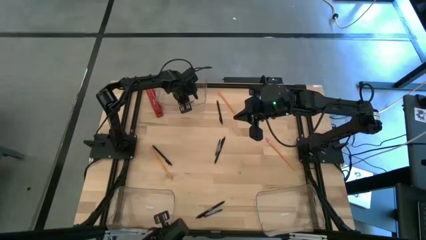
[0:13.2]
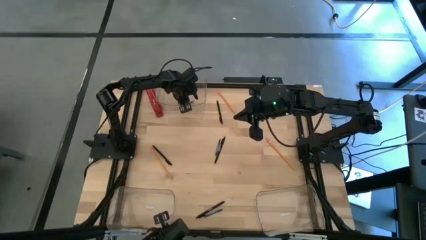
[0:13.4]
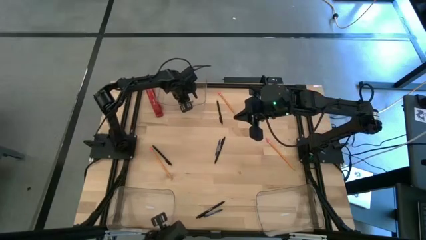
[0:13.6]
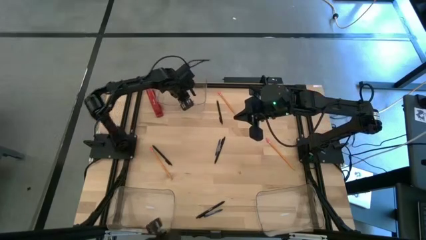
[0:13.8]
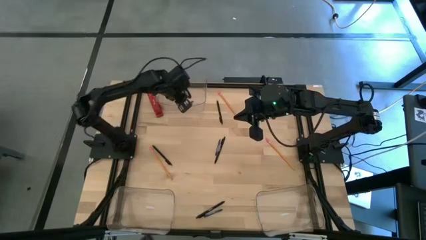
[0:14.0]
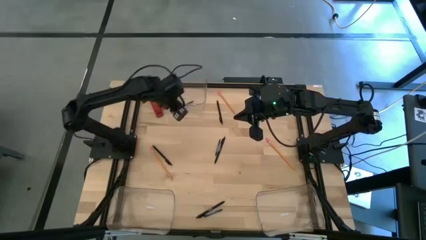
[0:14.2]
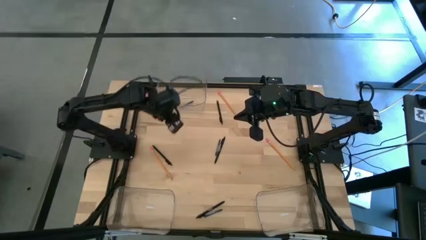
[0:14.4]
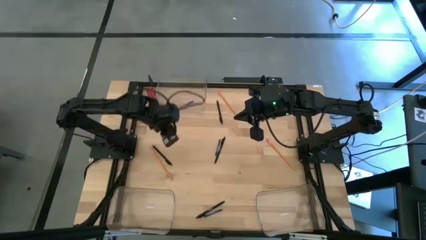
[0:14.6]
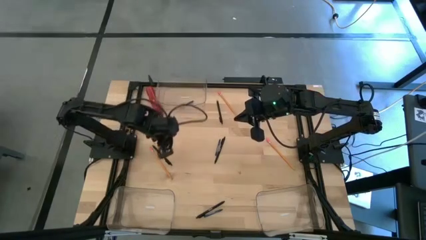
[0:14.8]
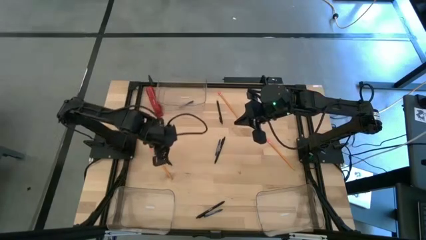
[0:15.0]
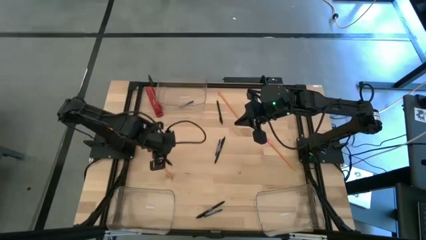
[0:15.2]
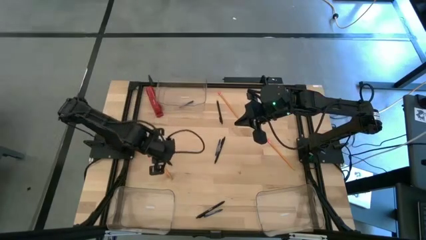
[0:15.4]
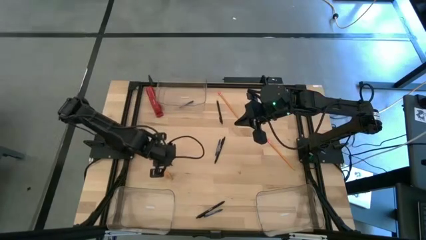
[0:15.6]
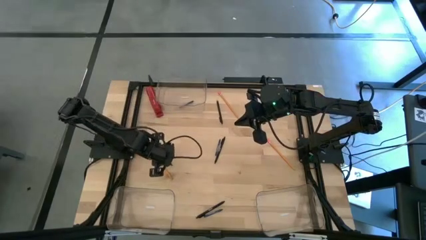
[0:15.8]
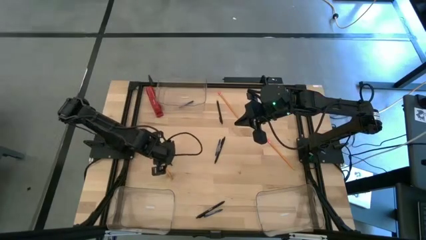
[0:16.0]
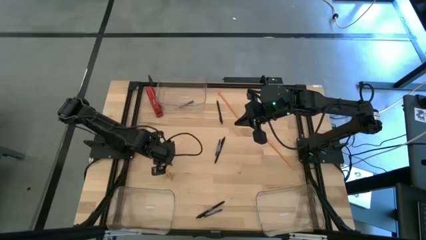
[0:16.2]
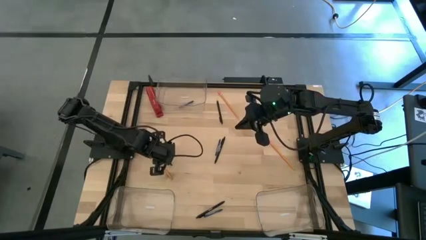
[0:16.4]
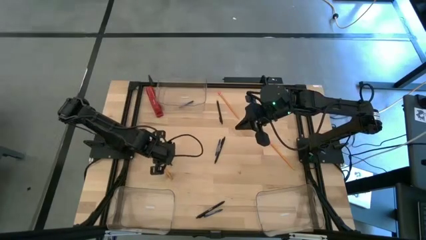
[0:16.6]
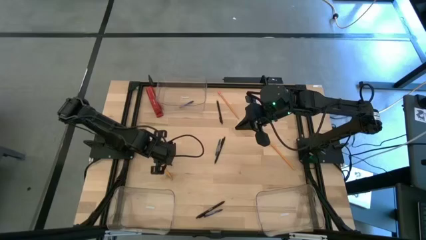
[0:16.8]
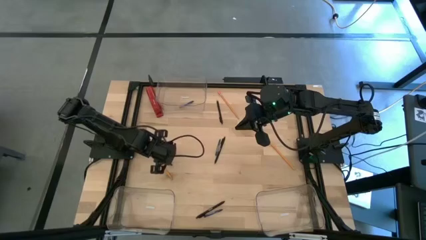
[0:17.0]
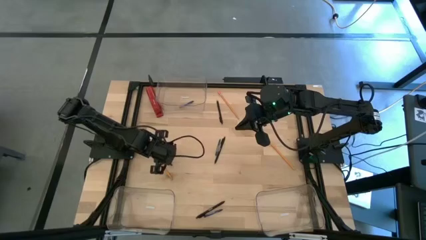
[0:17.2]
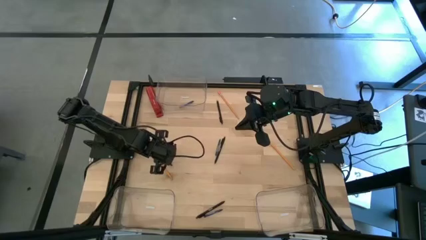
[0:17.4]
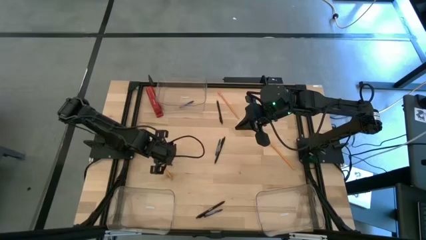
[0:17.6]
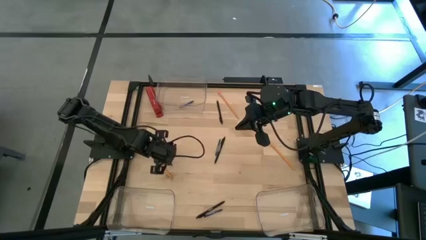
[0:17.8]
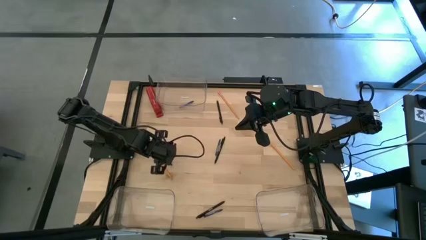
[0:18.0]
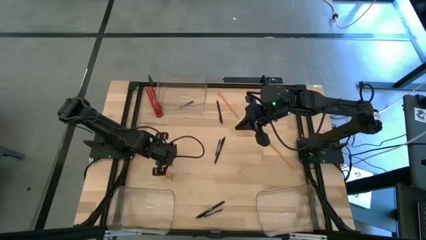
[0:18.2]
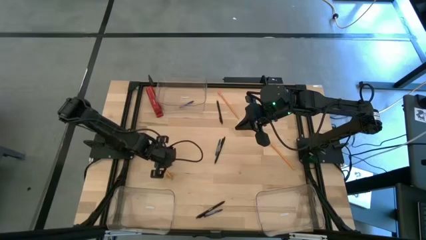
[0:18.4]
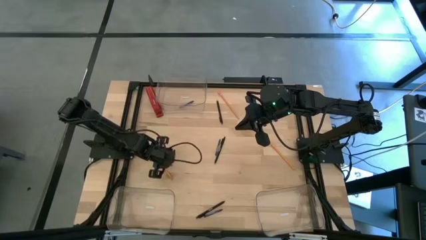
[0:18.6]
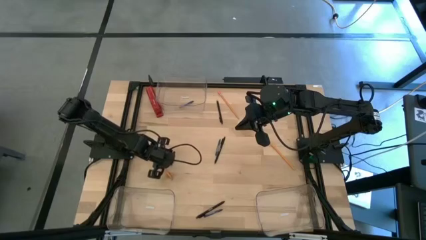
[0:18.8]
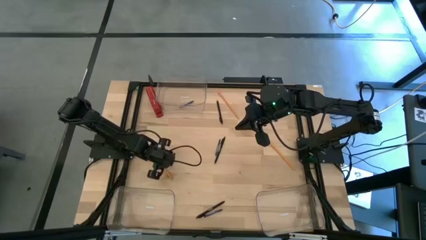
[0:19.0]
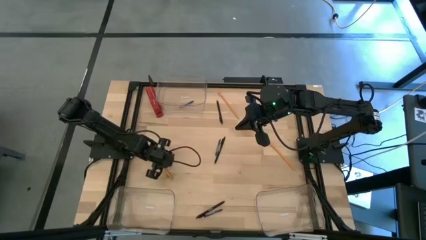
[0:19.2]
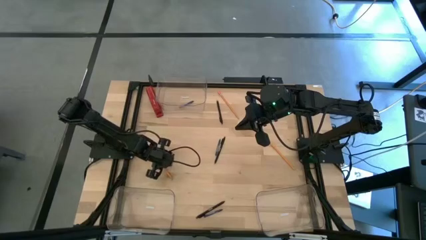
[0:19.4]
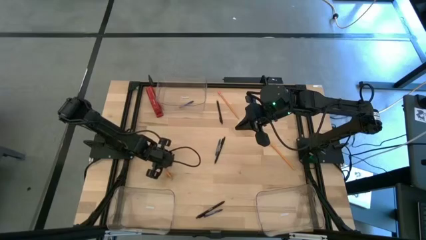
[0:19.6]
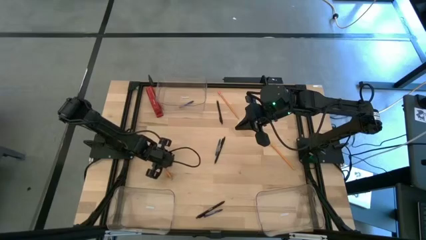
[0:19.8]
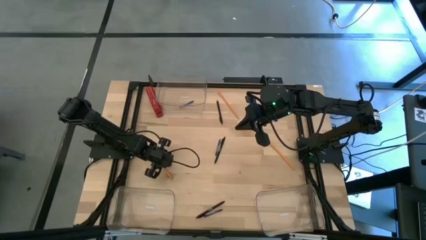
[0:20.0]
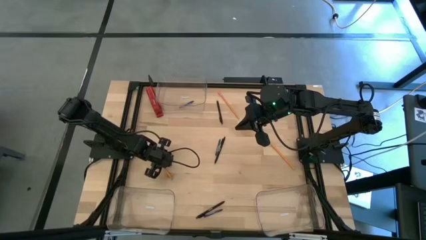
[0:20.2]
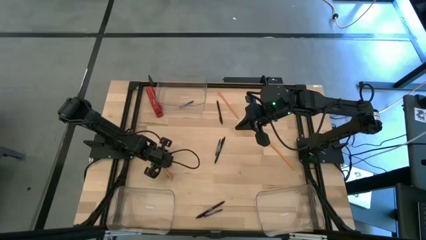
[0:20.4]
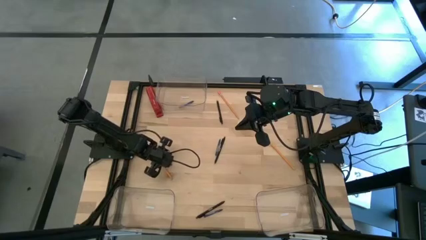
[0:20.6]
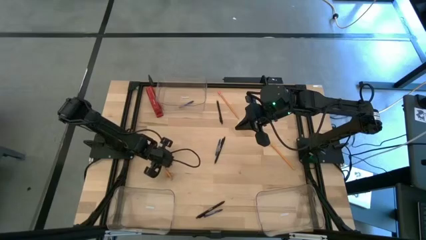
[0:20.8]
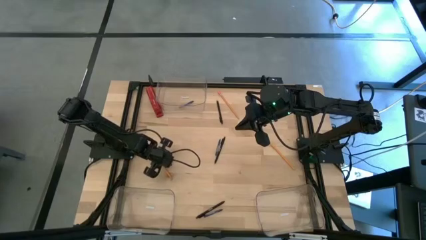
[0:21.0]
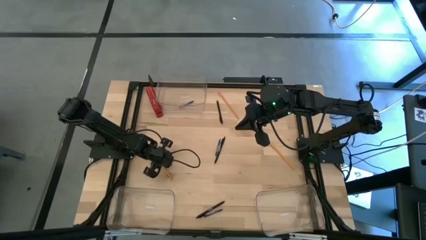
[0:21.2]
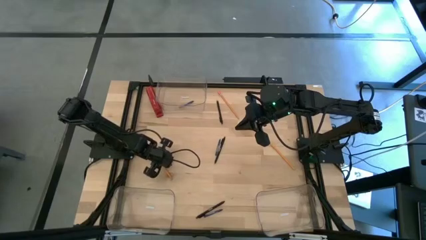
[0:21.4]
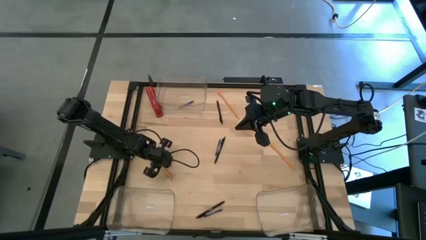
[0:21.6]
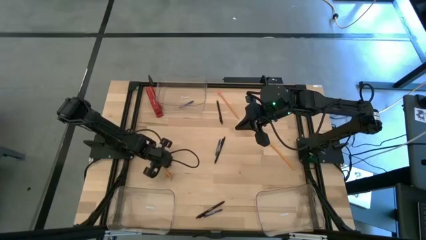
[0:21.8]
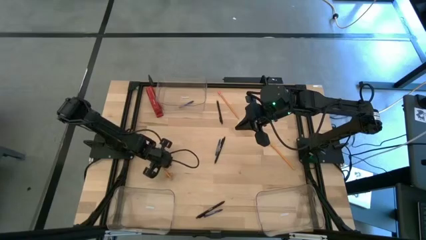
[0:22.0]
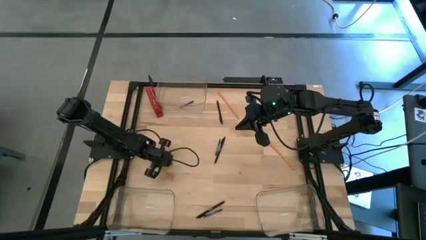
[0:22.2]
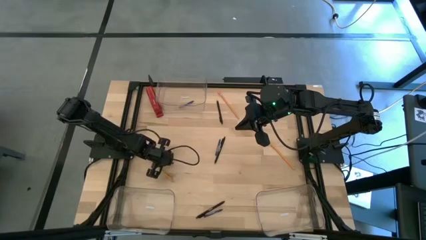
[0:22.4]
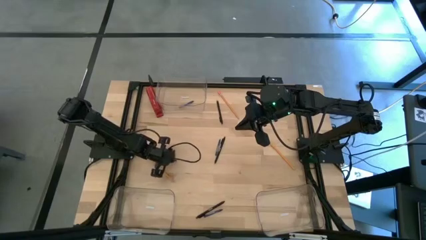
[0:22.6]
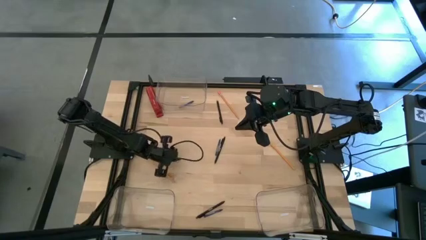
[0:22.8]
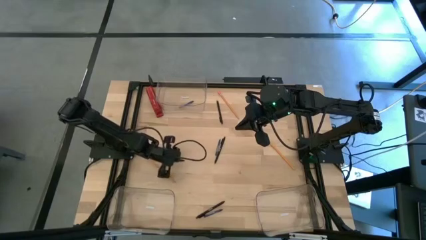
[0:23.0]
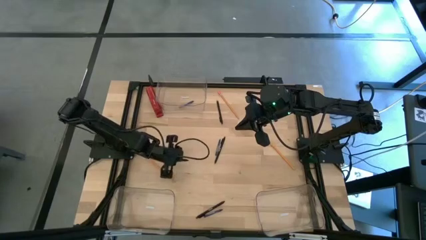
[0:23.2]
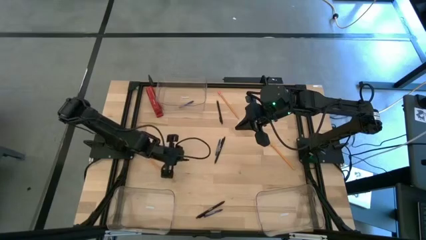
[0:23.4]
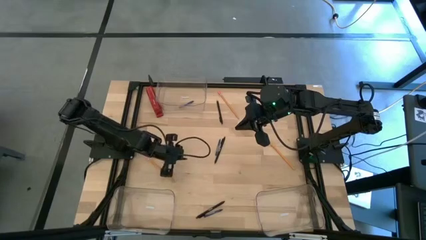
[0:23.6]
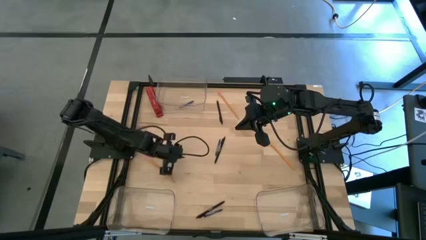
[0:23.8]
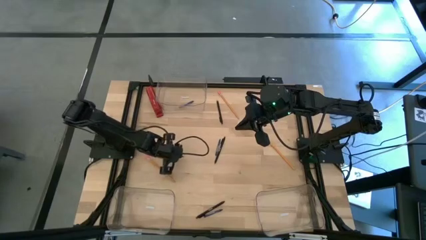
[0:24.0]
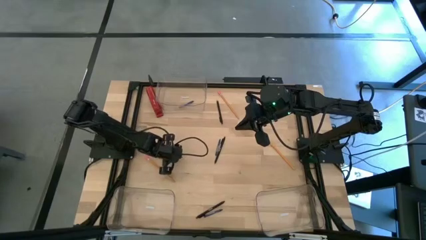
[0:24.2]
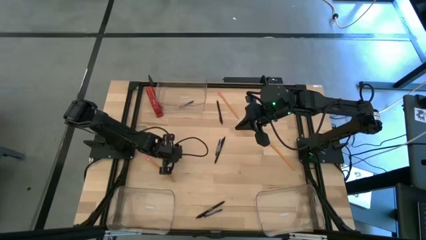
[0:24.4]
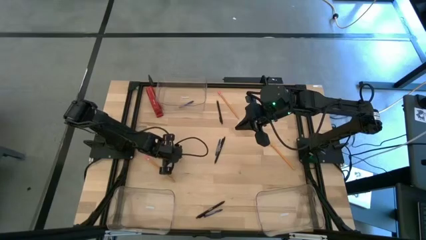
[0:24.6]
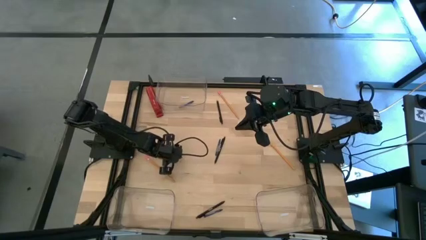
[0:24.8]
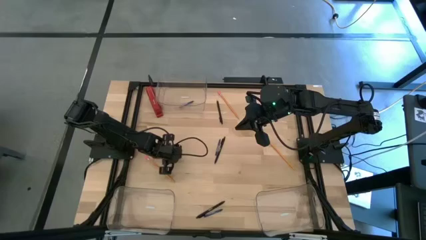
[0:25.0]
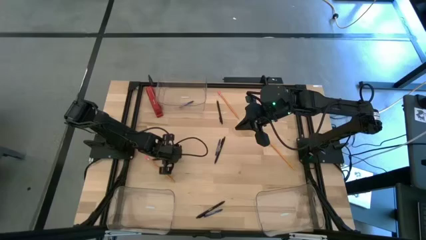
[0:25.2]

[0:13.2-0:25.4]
Task: Sort crayons/erasers/pens/pencils in bins
Put the black pen into the bottom left transparent bin

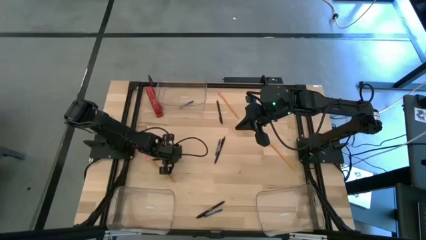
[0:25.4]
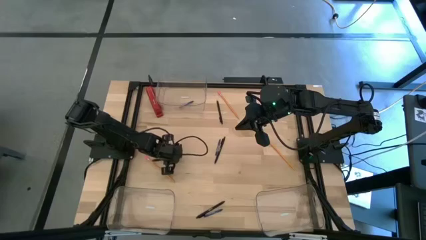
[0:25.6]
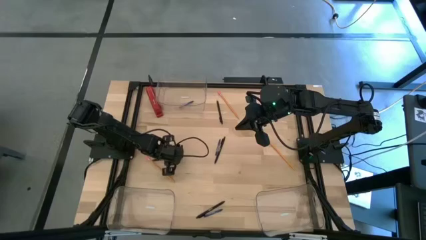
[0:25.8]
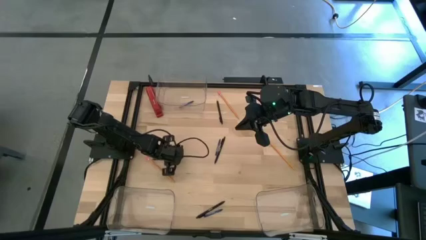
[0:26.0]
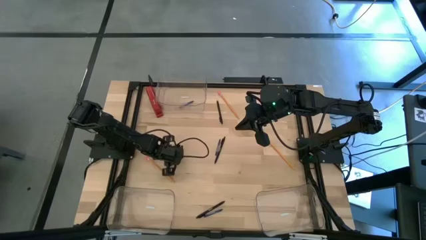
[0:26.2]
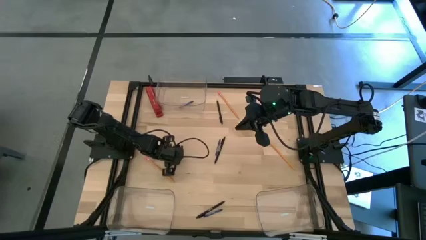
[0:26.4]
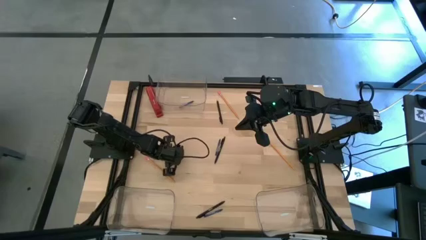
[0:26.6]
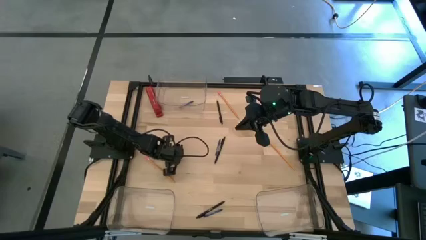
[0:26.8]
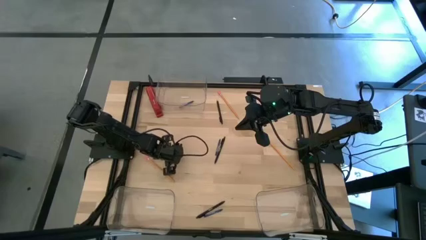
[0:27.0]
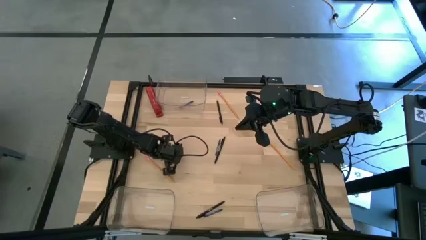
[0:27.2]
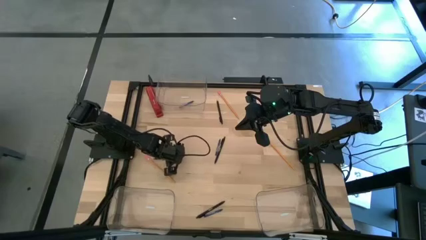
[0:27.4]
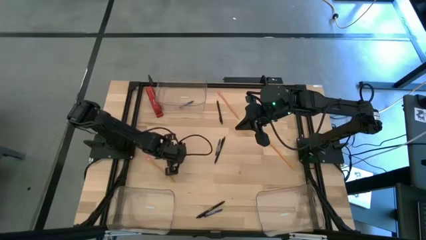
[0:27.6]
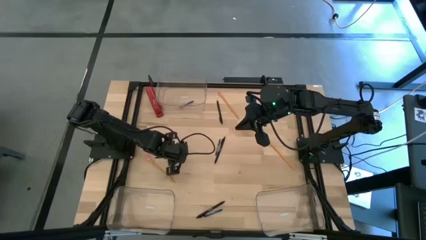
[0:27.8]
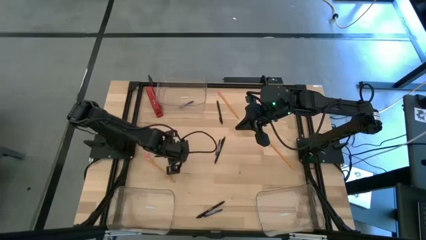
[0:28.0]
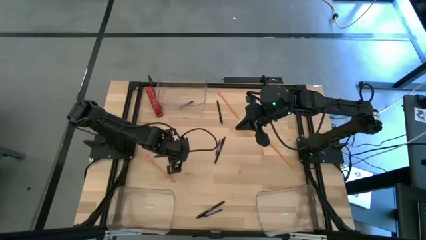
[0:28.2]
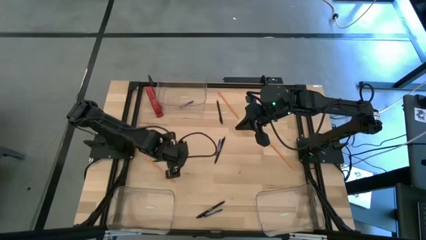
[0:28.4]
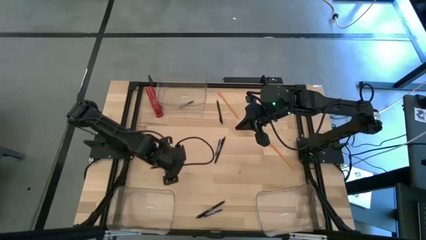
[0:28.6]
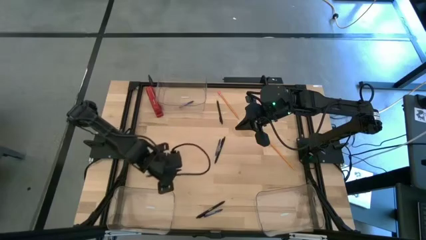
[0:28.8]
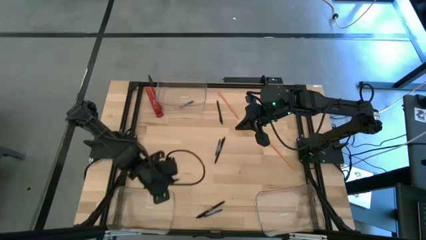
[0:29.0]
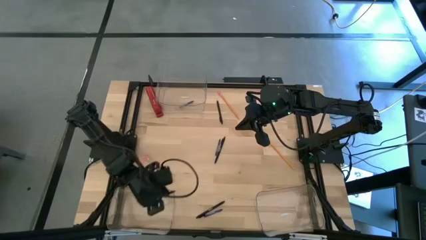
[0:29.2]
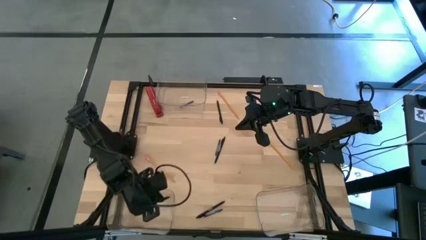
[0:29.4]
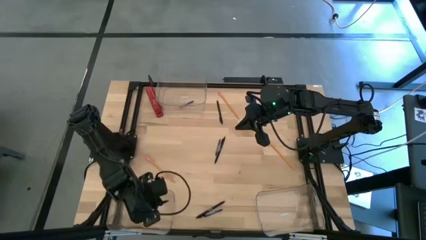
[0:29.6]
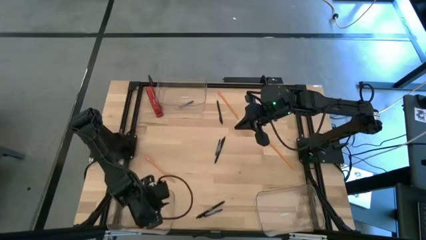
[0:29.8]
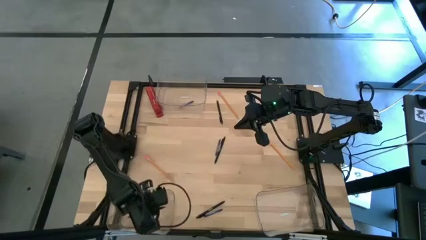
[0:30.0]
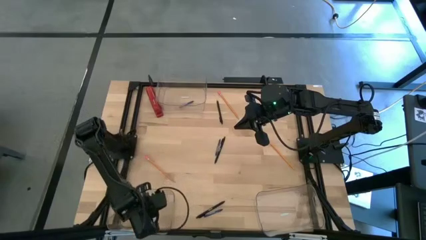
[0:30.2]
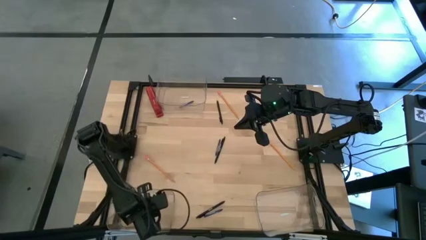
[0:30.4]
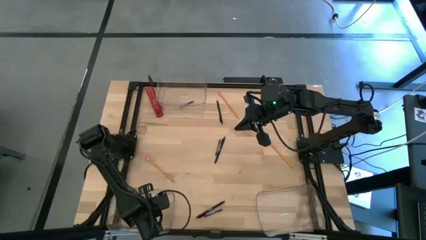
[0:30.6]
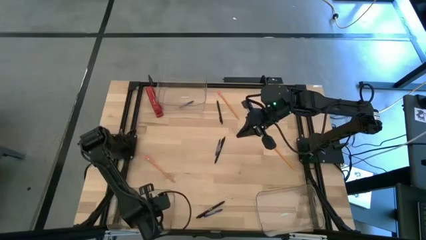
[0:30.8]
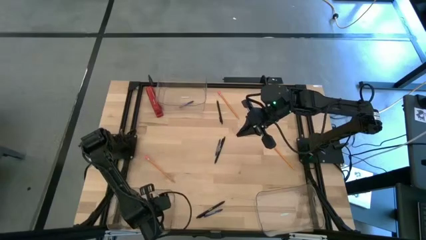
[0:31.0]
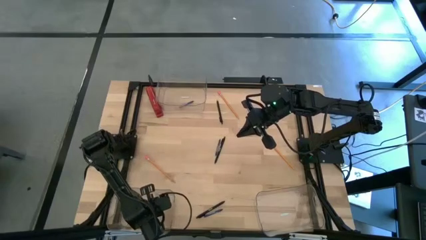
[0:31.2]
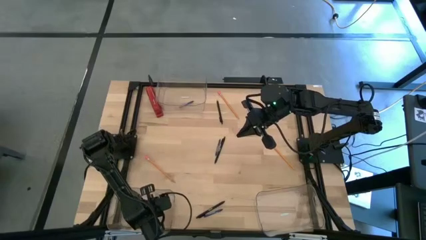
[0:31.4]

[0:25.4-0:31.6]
Put the black pen into the bottom left transparent bin
